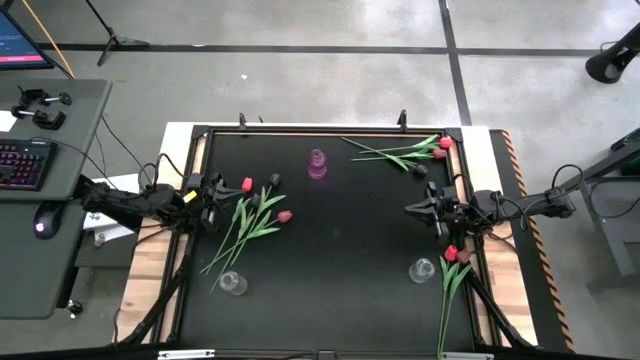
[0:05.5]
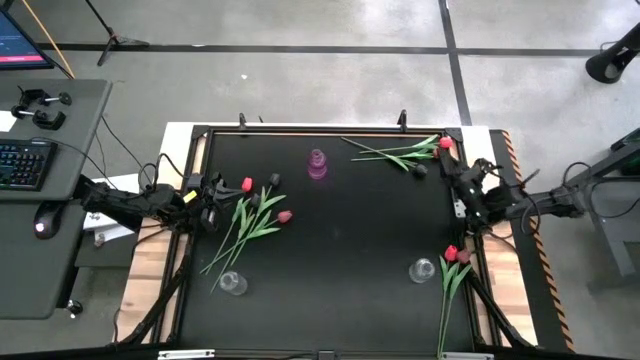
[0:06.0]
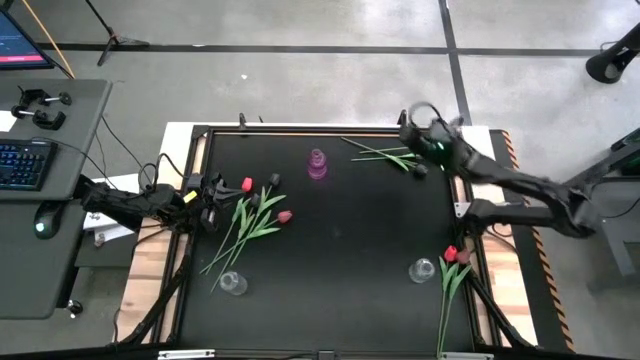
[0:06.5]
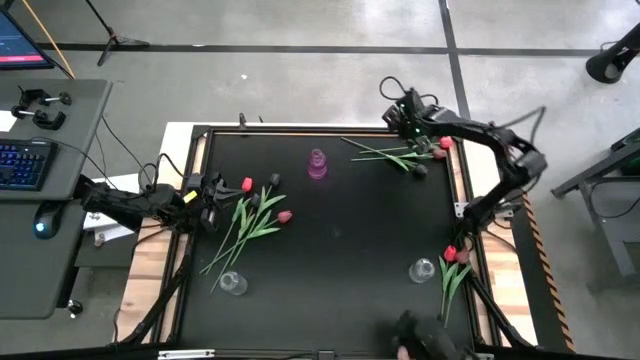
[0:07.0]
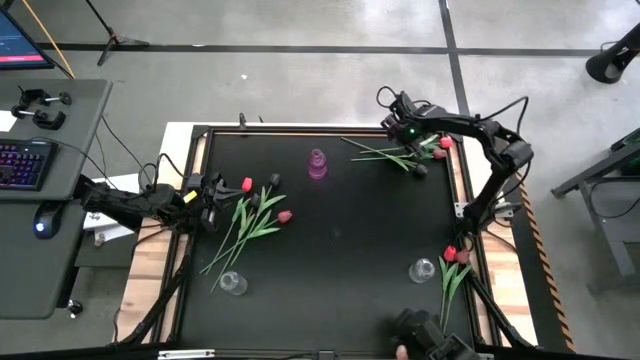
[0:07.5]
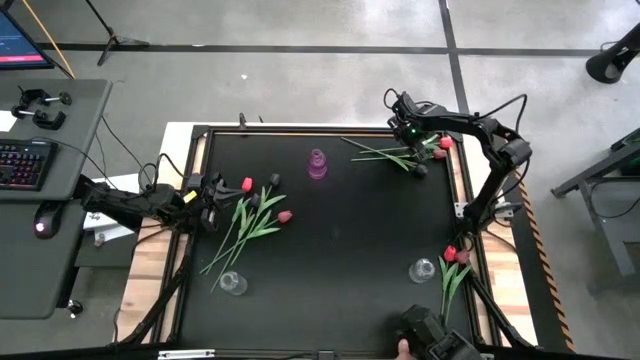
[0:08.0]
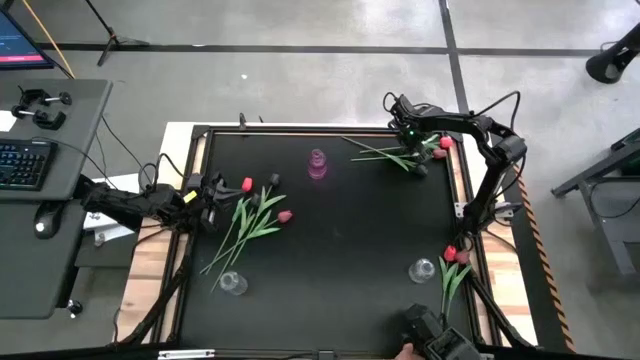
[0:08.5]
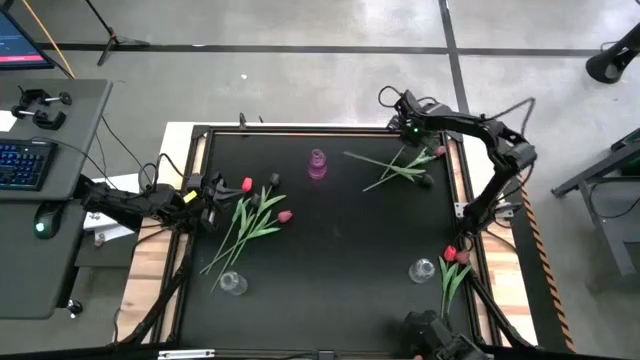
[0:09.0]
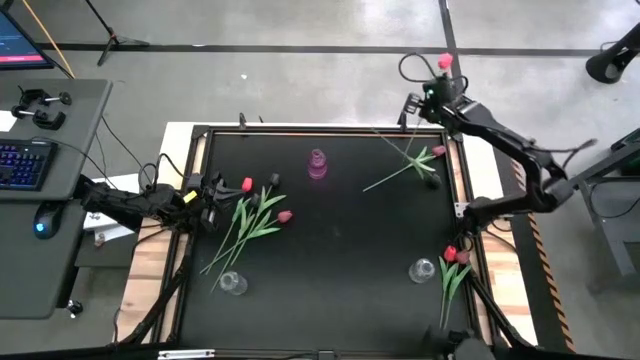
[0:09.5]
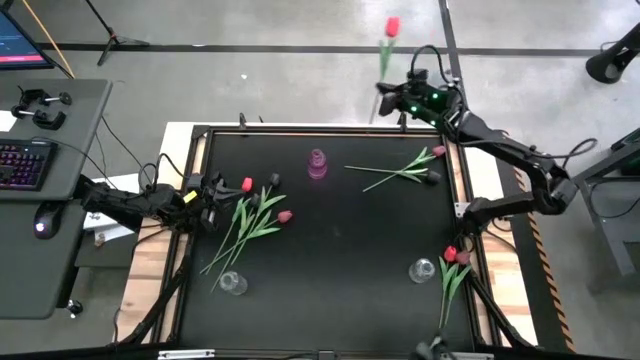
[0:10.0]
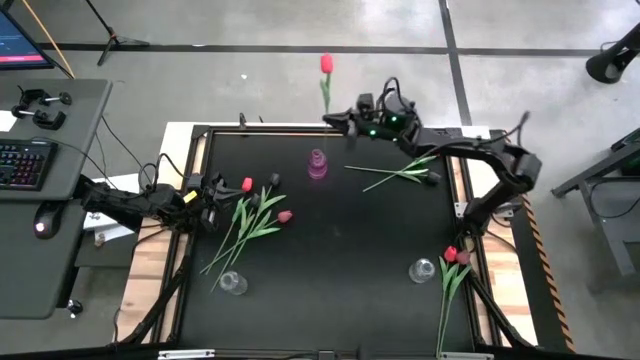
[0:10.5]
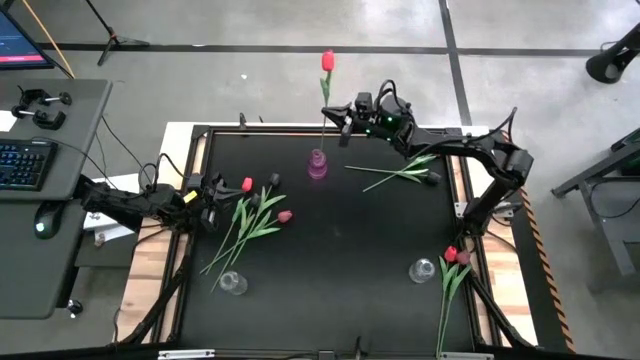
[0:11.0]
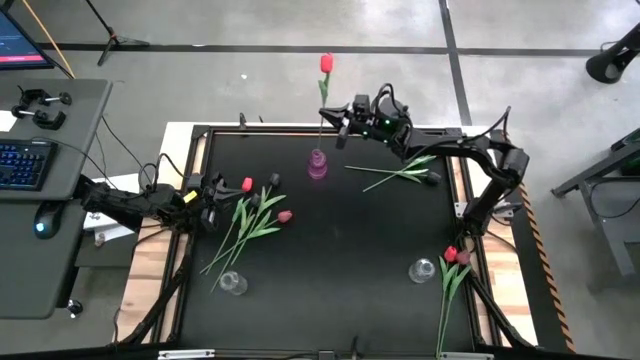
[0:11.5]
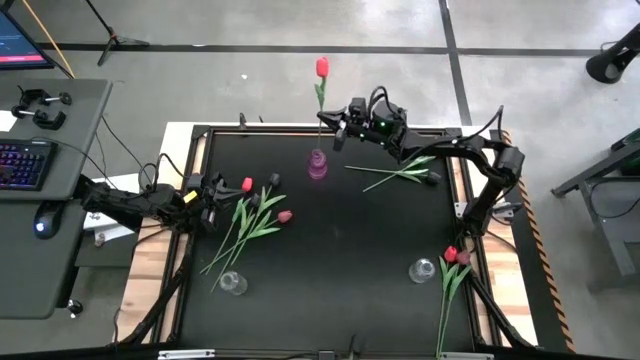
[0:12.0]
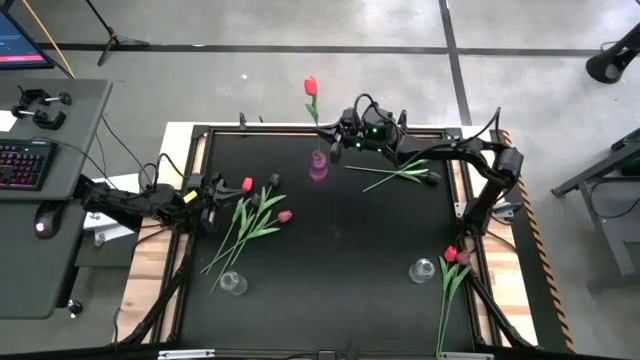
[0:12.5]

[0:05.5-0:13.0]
Task: Sort flowers into vase by color
Put the top pink tulip into the violet vase

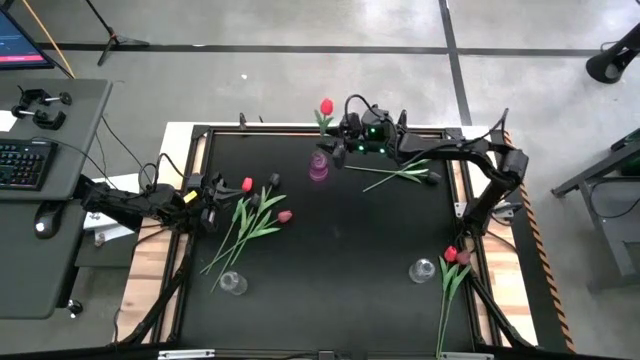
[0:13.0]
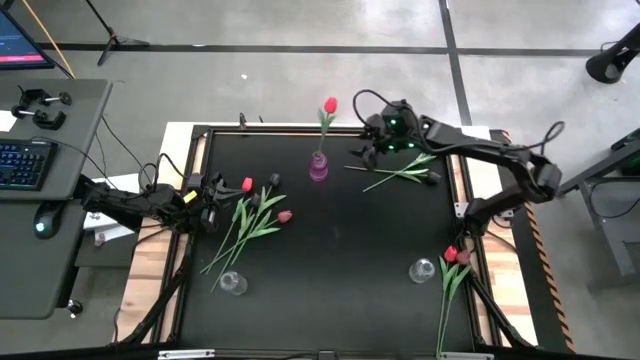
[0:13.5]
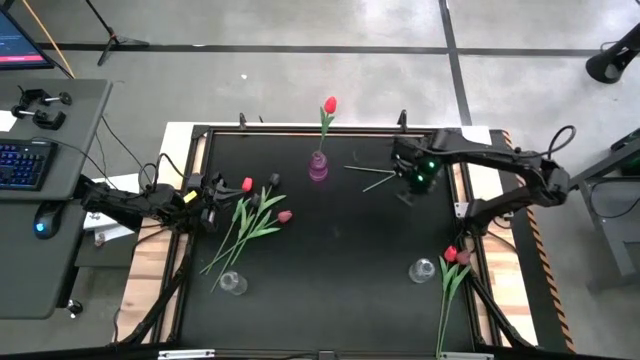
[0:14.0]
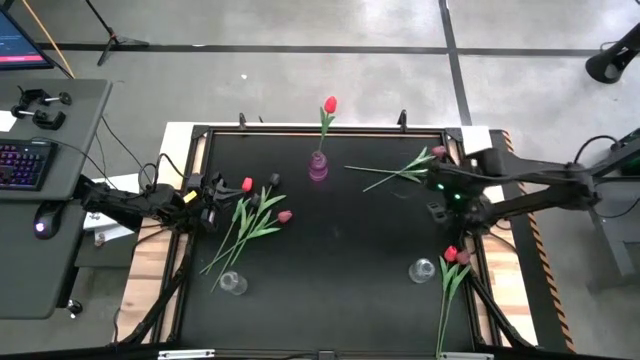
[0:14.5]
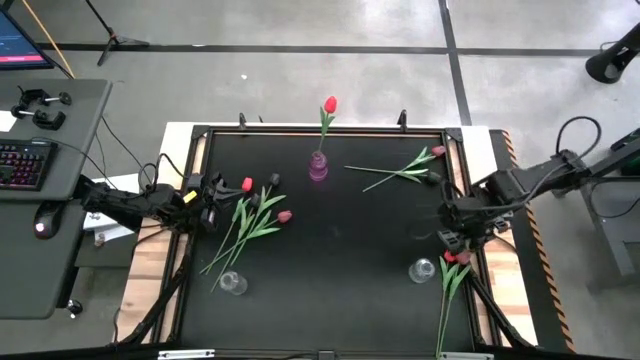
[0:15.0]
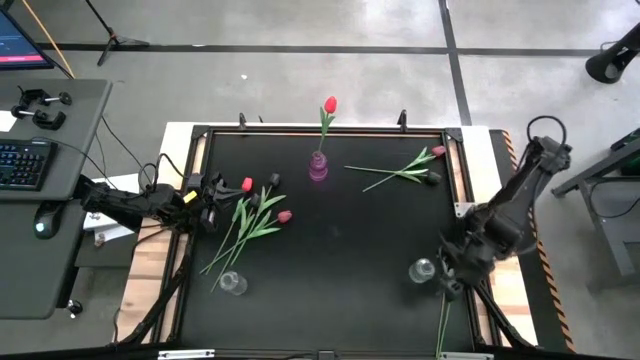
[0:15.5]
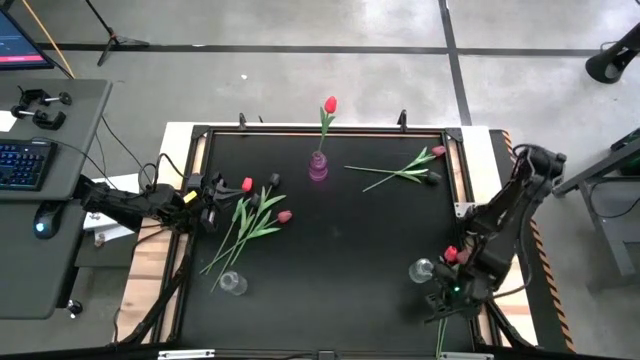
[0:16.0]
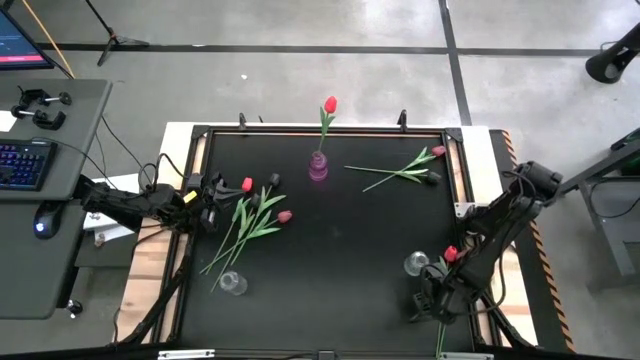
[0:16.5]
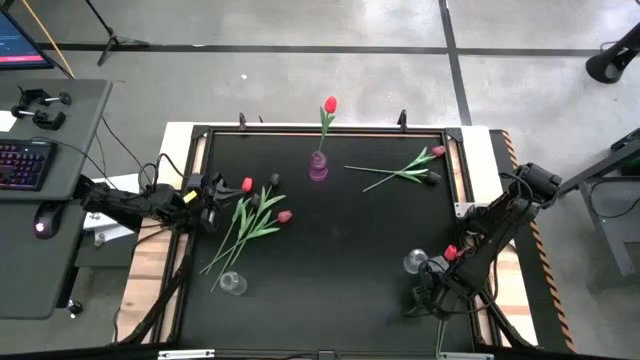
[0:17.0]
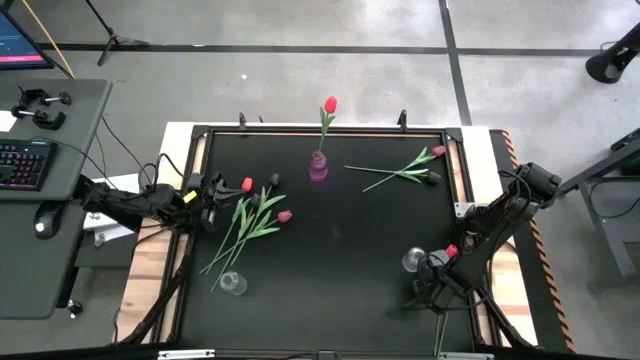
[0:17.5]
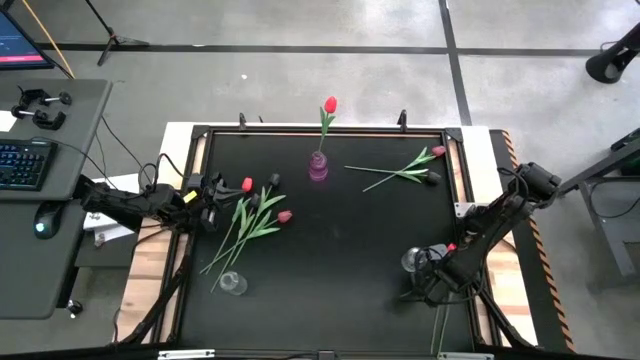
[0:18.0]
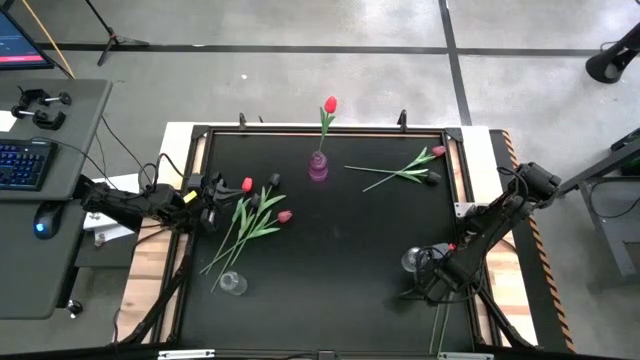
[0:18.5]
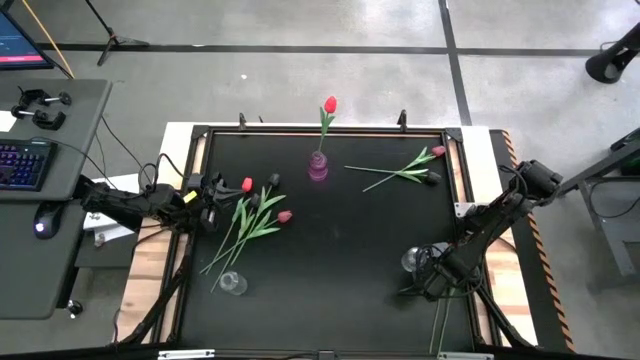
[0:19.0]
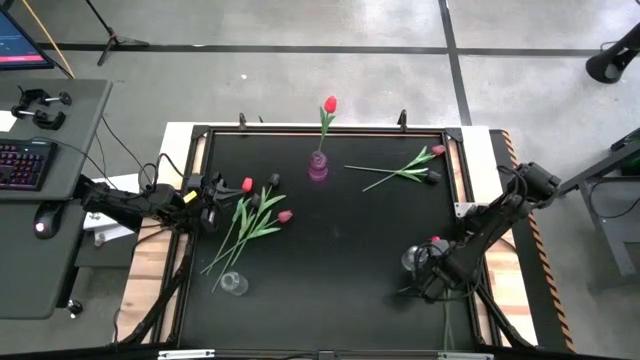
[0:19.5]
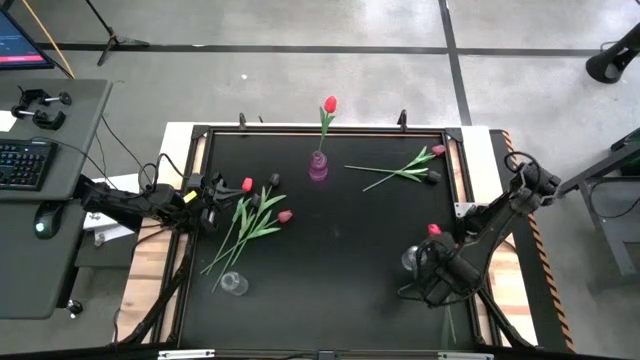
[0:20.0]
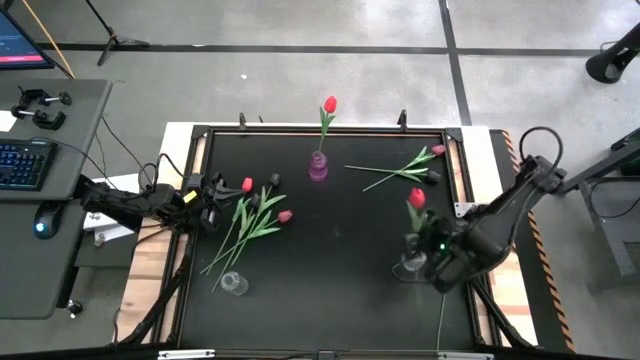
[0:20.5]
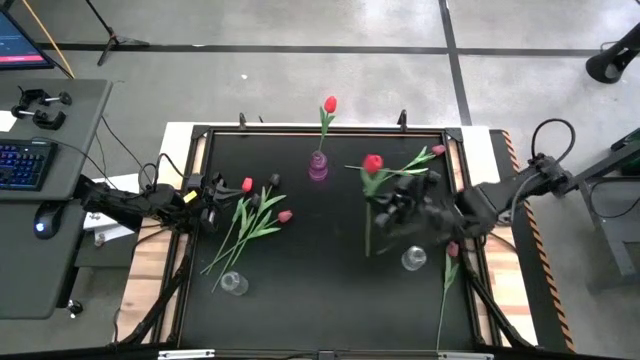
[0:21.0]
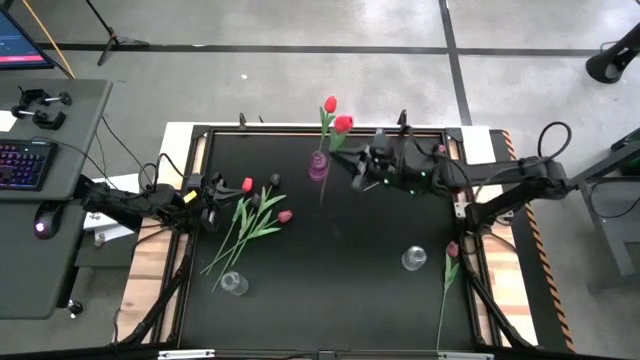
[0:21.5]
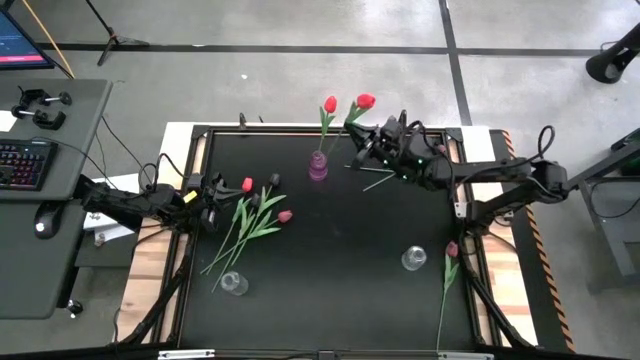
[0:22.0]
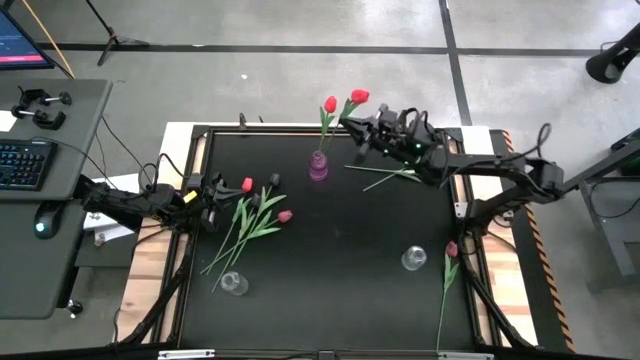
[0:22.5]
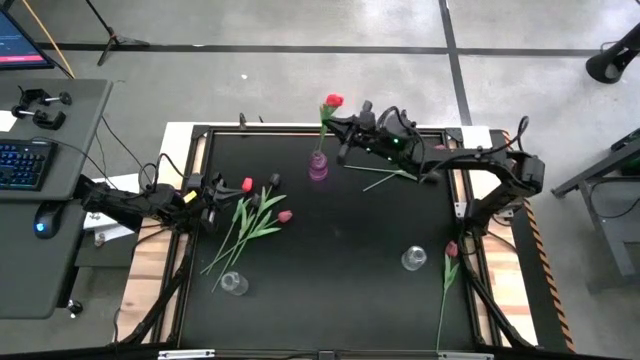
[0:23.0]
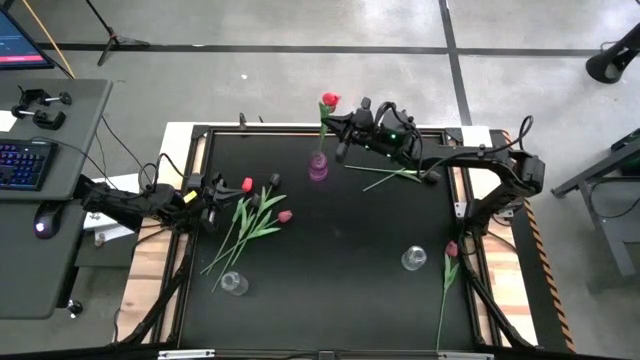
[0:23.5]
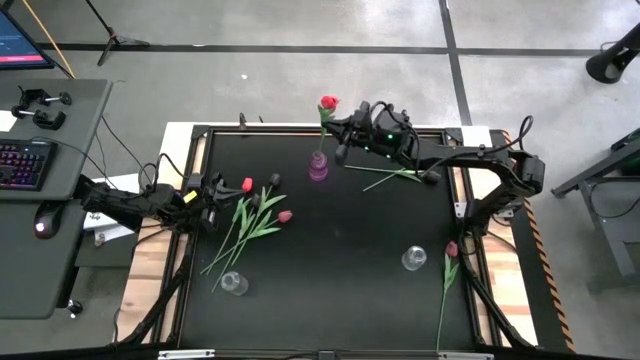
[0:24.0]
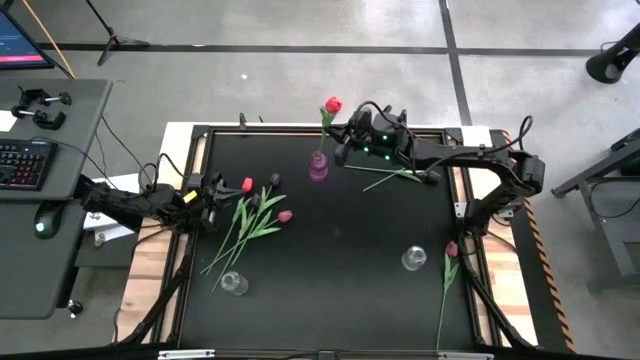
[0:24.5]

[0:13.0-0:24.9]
Put the right pink tulip into the violet vase

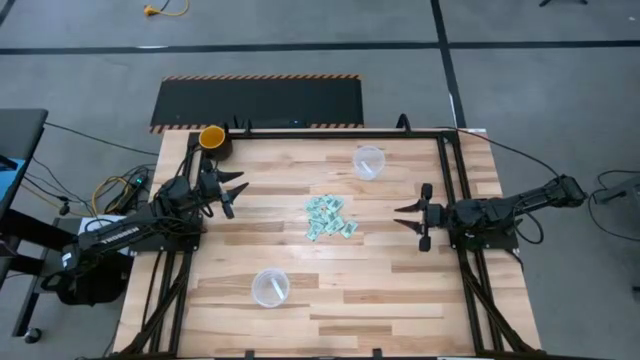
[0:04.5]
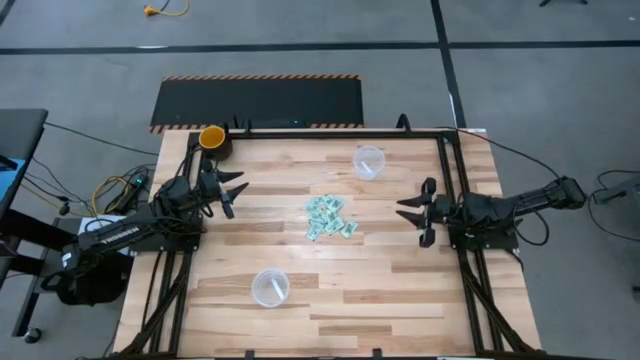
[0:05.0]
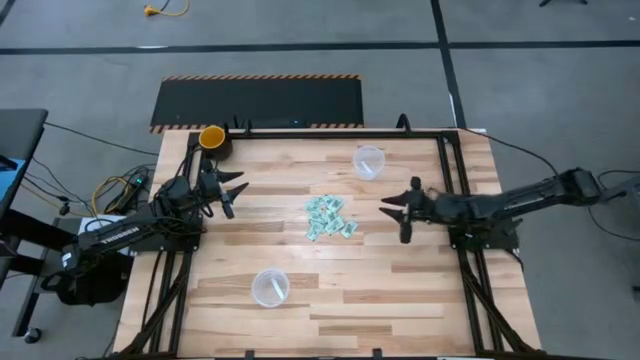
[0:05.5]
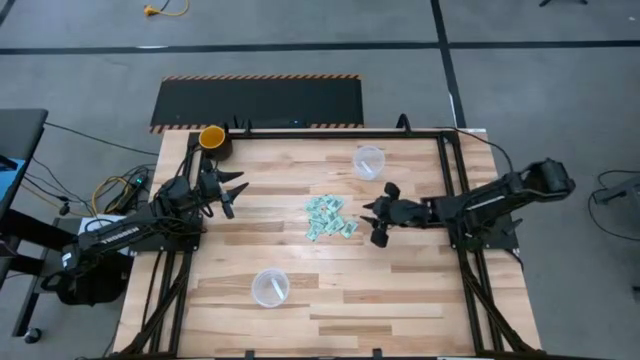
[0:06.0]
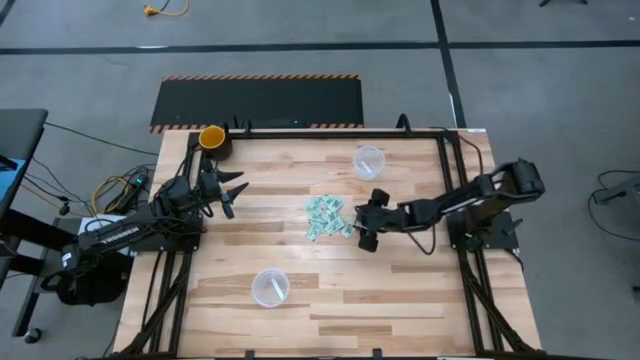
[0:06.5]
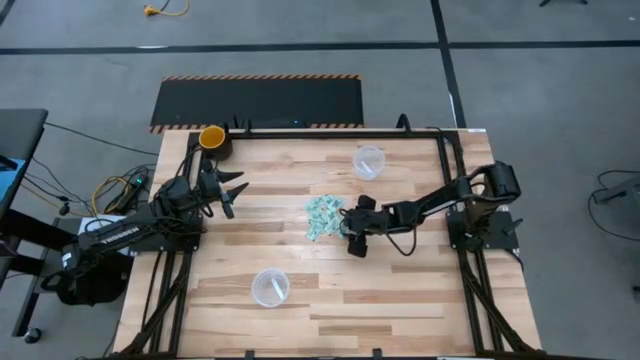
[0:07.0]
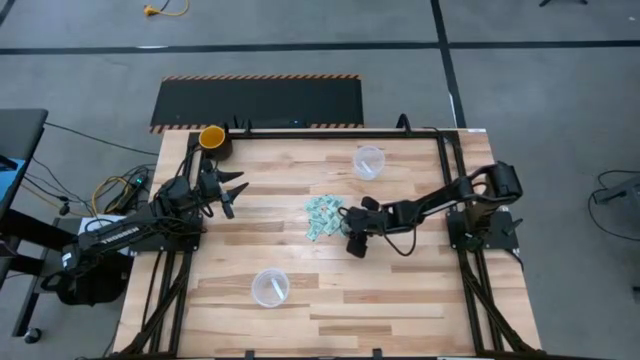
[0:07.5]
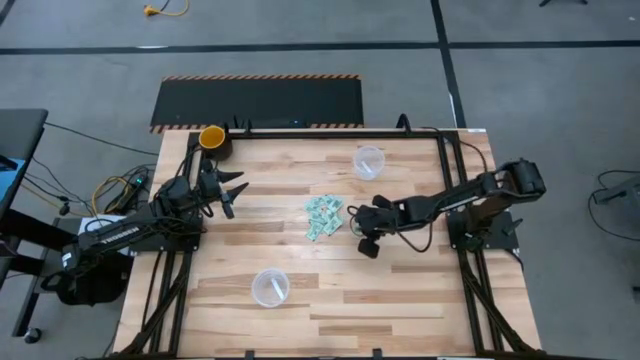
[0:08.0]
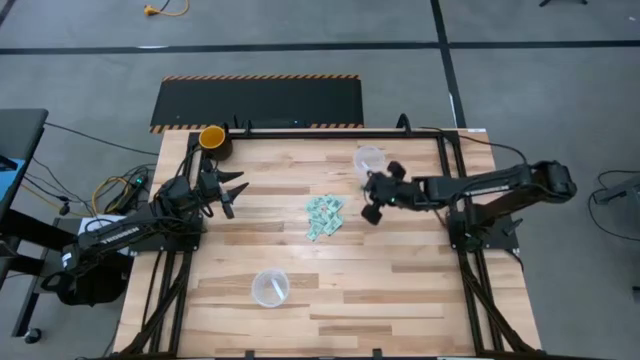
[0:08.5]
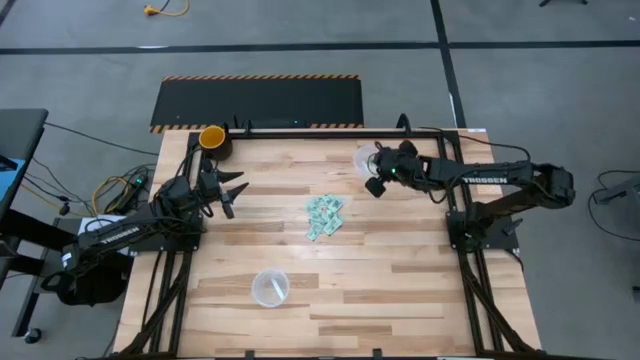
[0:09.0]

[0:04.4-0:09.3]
Task: Pick and place Stevia / Truvia into bins
Put the stevia packet into the top container
